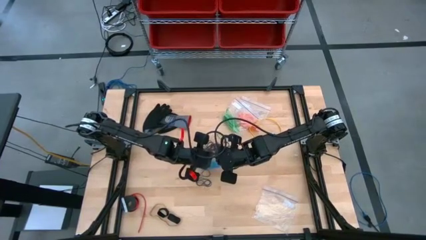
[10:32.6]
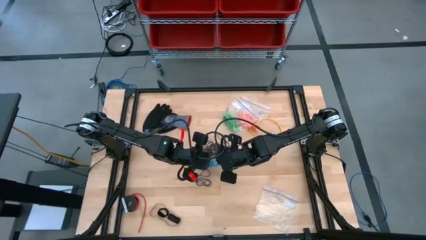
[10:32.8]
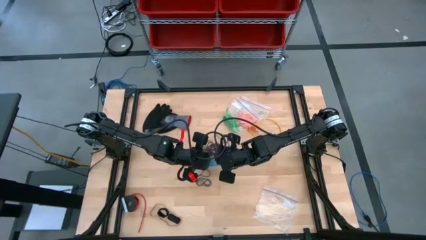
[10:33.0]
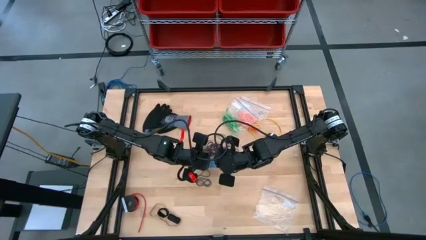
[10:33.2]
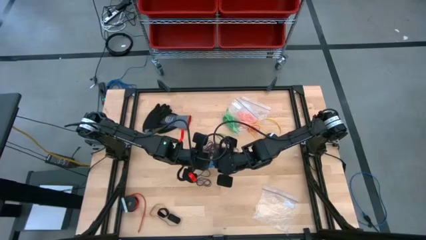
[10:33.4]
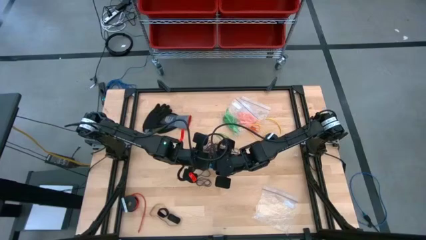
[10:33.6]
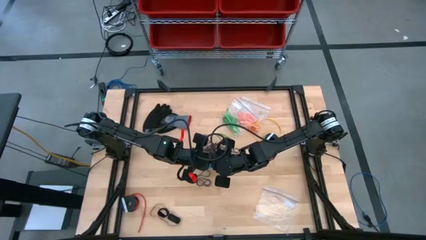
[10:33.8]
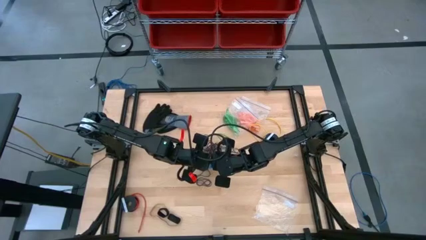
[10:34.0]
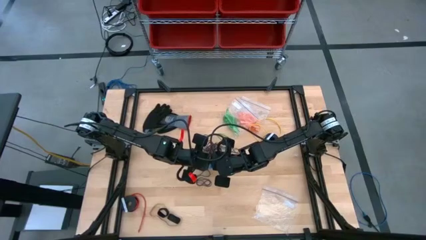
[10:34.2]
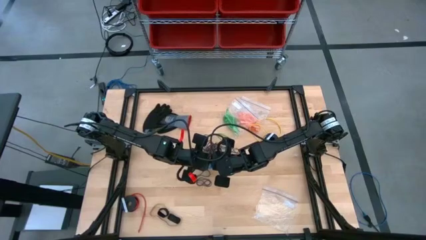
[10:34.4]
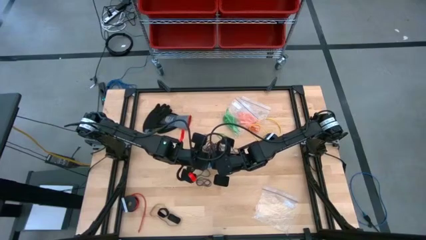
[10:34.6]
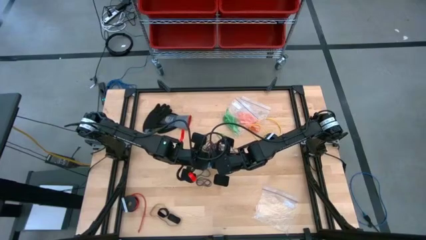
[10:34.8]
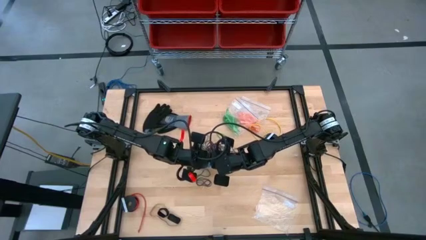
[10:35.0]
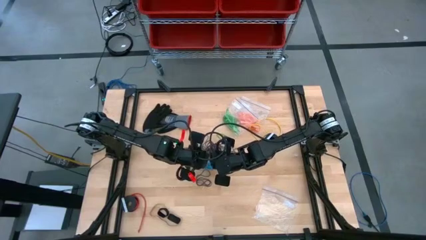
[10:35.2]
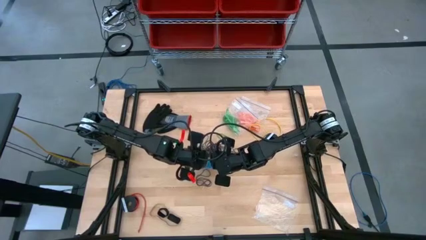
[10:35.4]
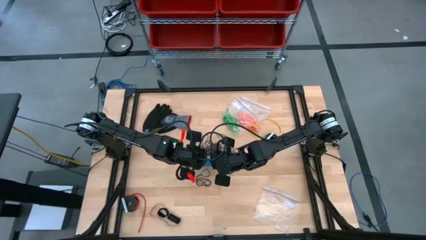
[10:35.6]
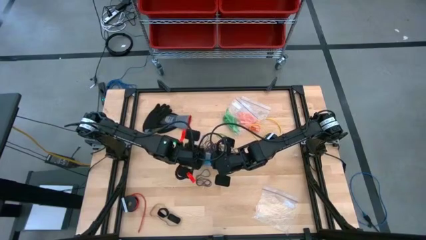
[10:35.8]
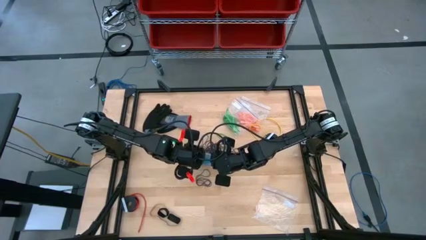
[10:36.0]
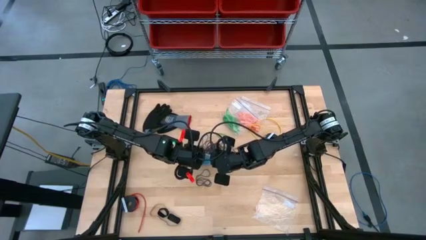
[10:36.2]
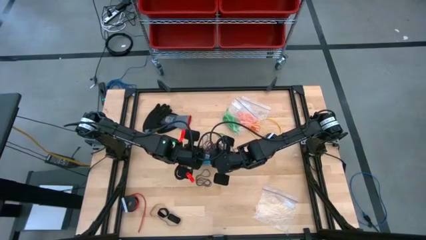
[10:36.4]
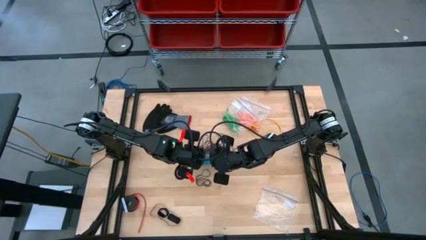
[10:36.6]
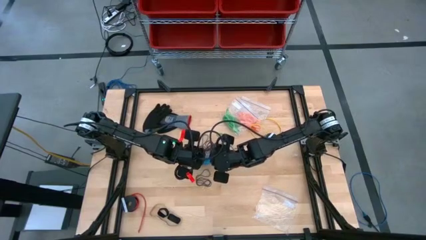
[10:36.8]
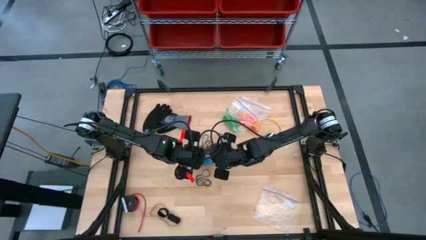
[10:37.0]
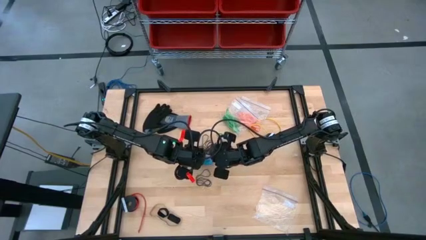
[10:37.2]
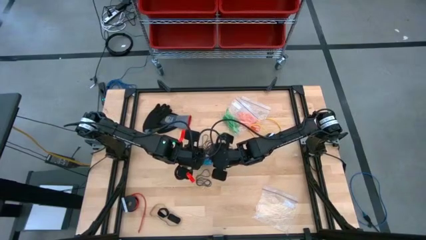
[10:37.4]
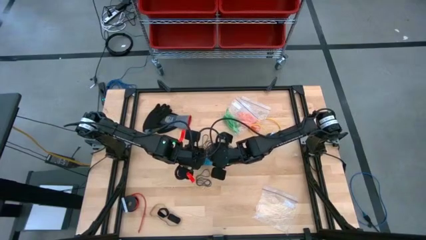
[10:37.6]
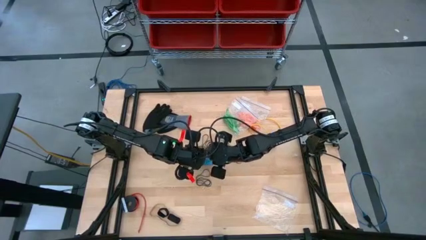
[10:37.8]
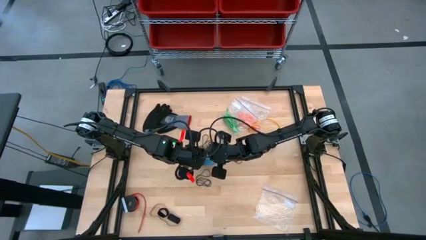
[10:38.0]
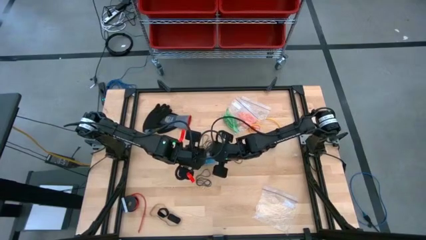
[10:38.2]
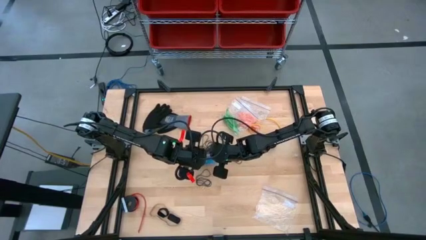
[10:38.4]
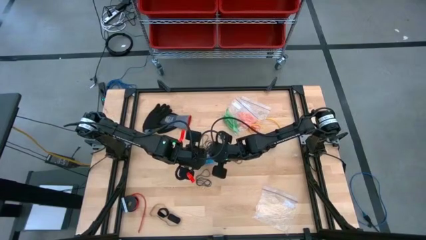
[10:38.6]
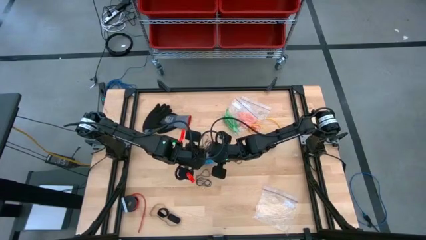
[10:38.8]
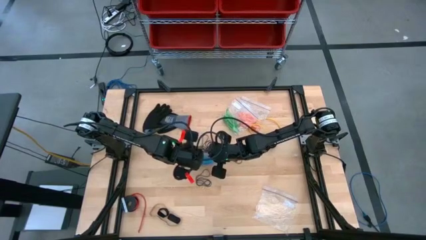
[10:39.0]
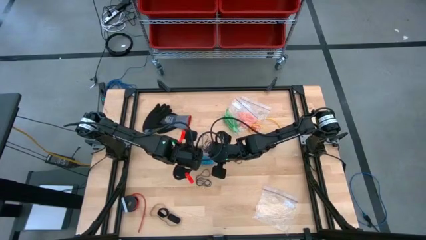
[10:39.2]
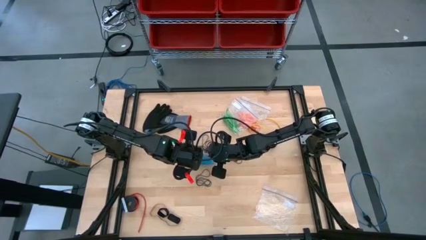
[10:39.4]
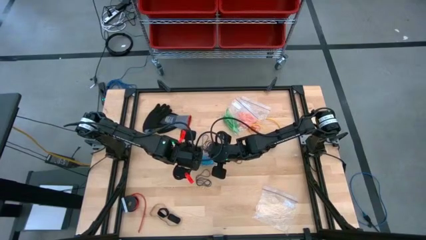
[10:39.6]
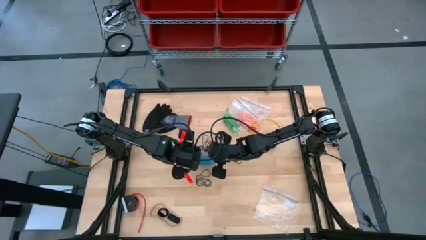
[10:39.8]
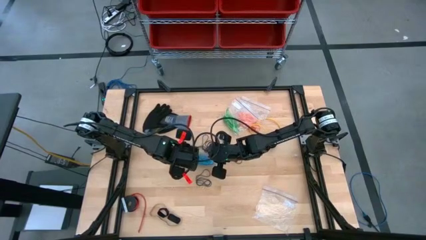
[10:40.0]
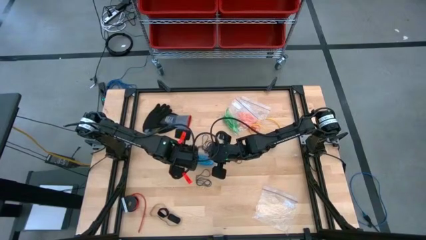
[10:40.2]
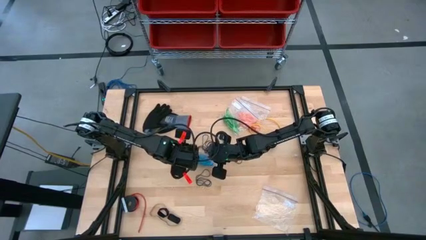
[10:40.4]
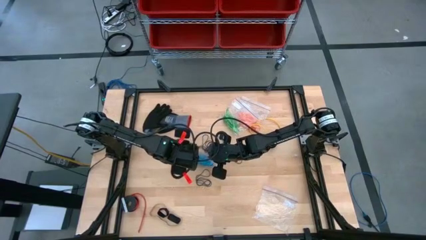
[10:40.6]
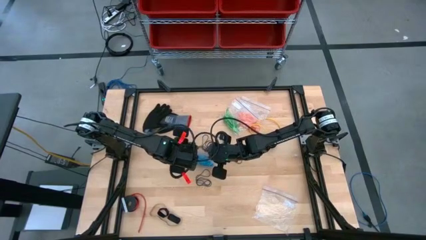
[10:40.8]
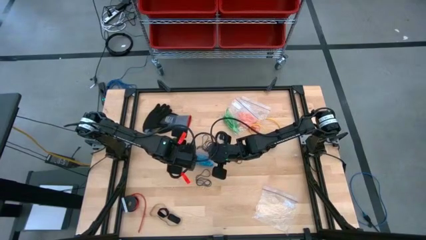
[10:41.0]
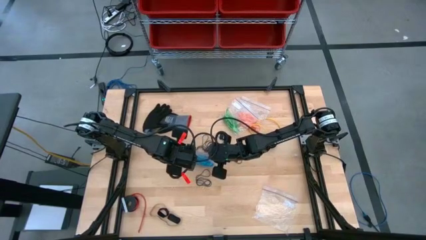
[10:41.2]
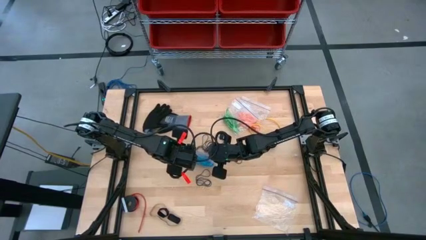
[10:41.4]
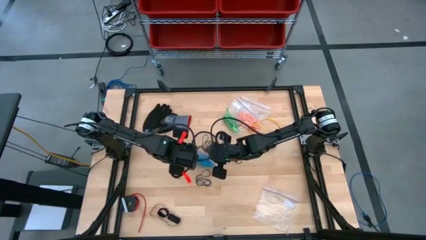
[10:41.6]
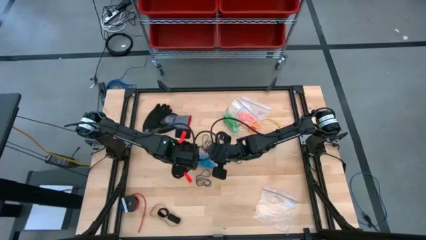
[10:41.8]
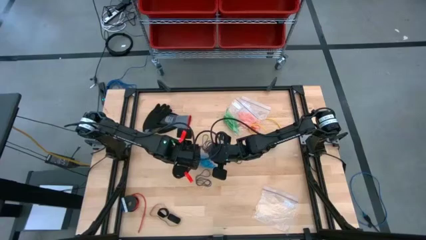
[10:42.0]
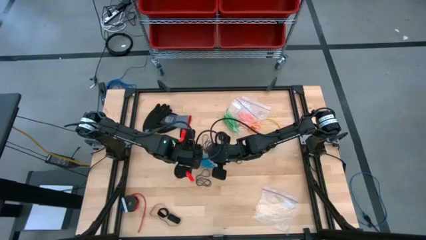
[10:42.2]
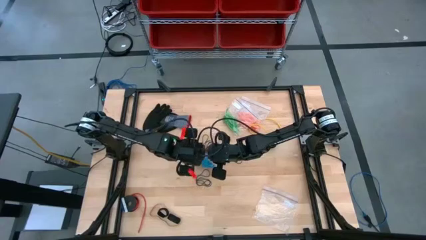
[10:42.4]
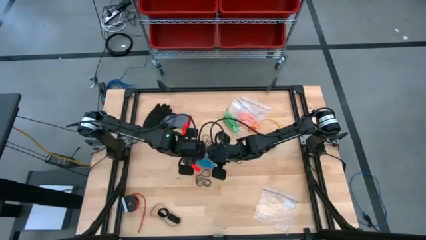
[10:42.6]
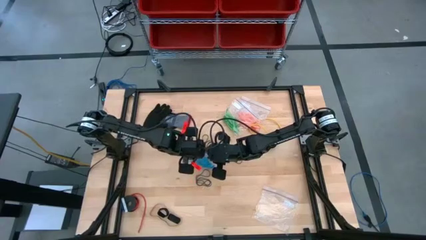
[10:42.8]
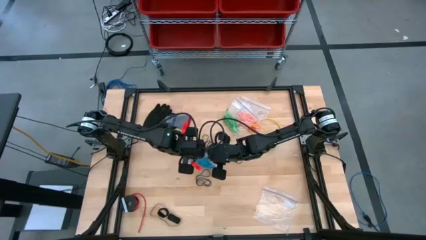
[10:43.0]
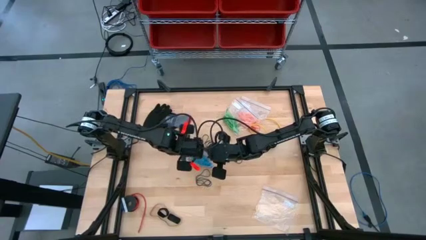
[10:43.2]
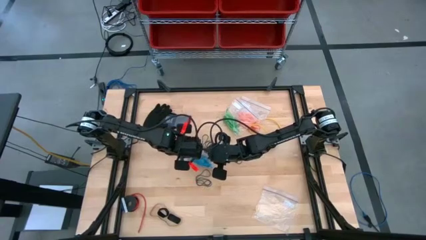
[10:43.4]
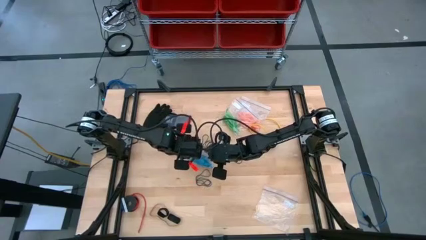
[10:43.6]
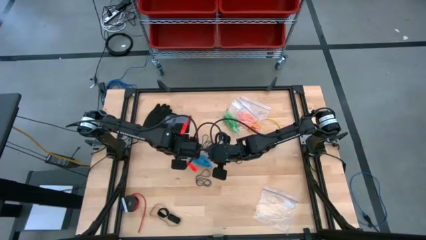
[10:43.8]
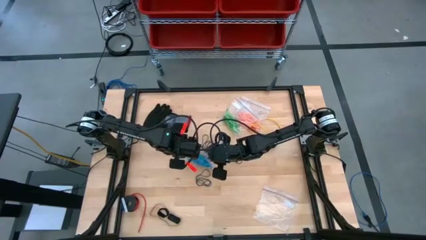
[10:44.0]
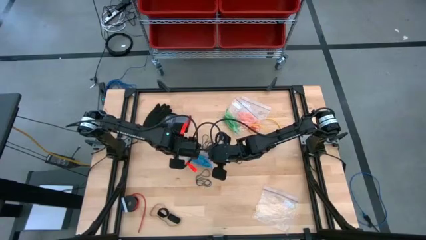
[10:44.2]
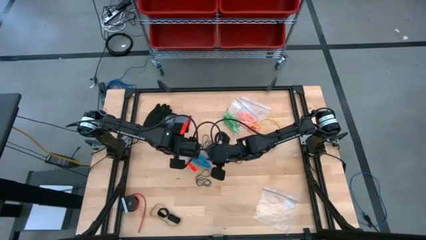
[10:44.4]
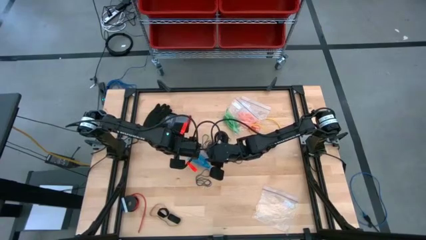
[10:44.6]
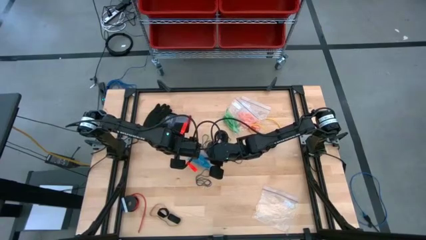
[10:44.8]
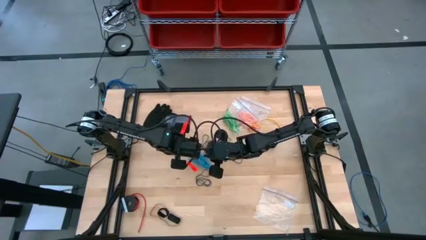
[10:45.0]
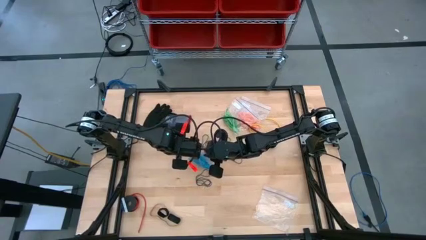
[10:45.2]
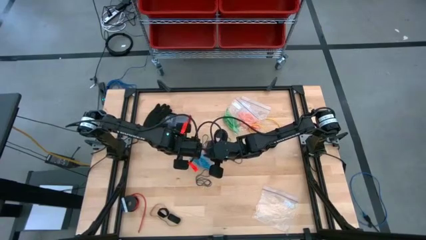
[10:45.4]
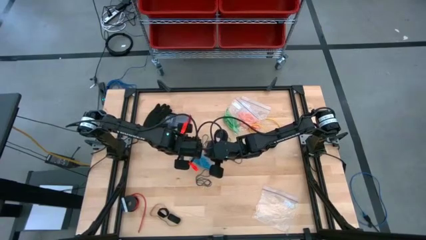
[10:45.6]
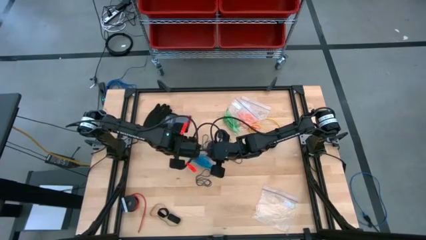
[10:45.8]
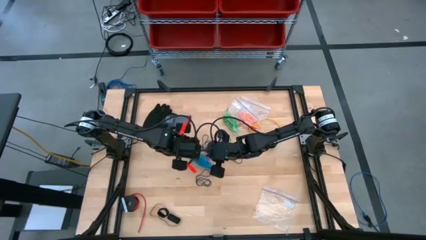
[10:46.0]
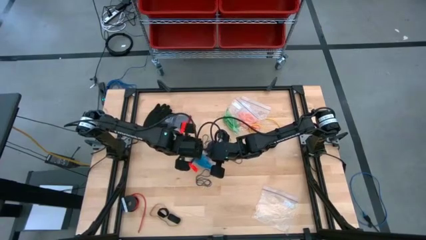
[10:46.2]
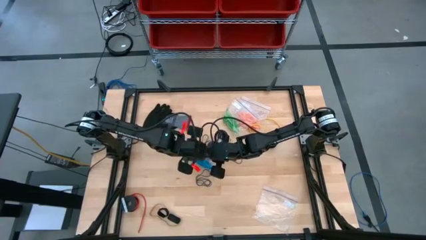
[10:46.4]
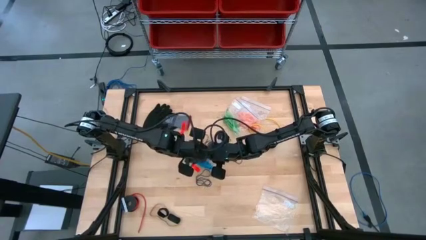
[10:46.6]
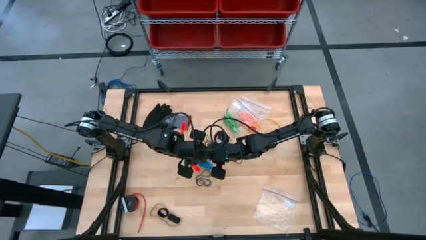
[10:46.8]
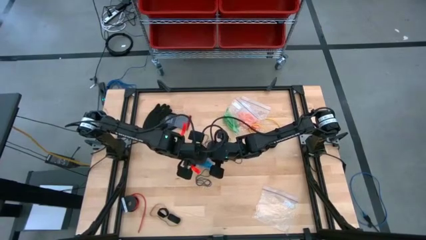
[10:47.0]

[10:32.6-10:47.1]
Task: Sort rubber bands
Close the transparent zip bag
